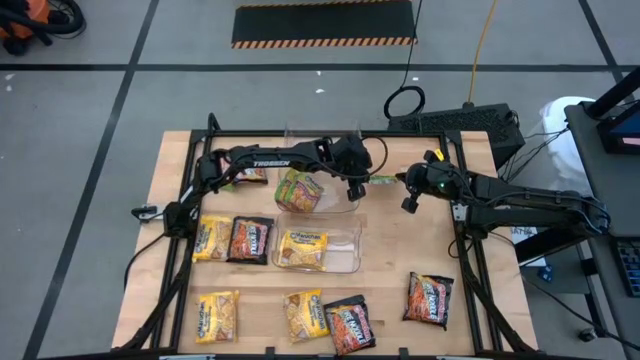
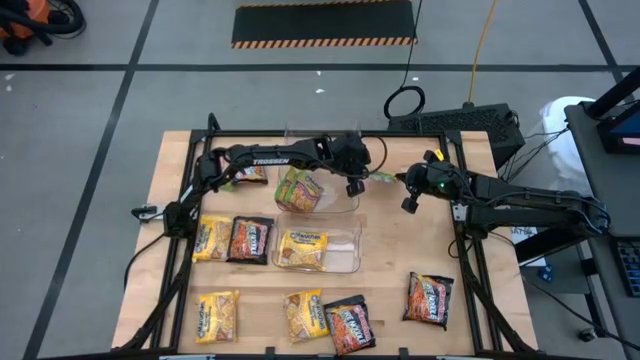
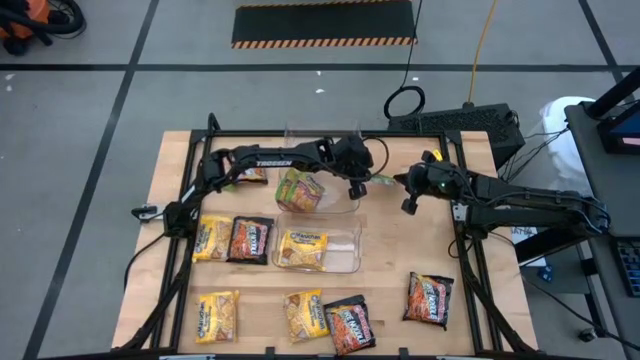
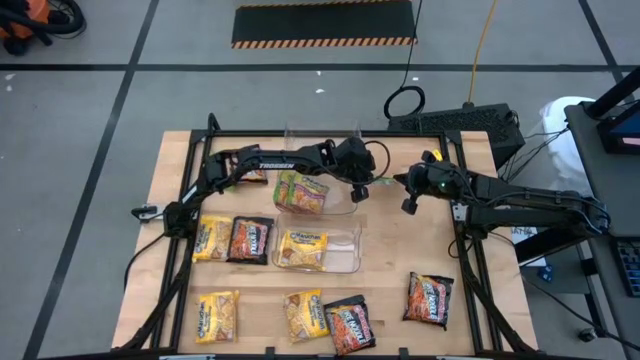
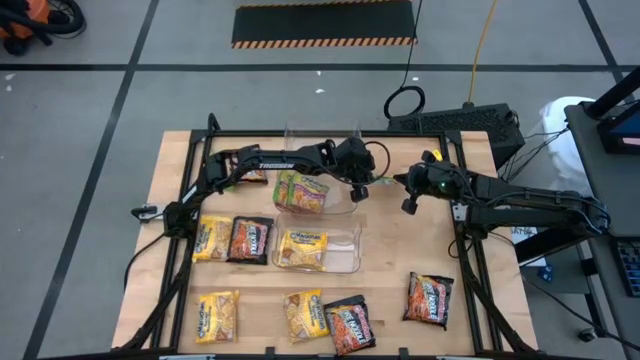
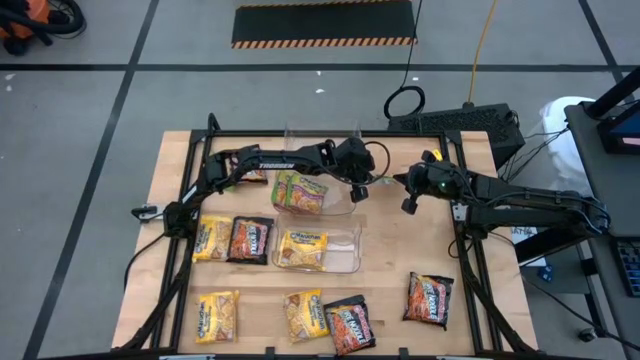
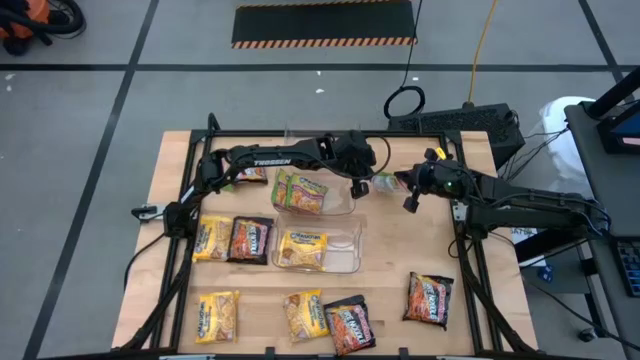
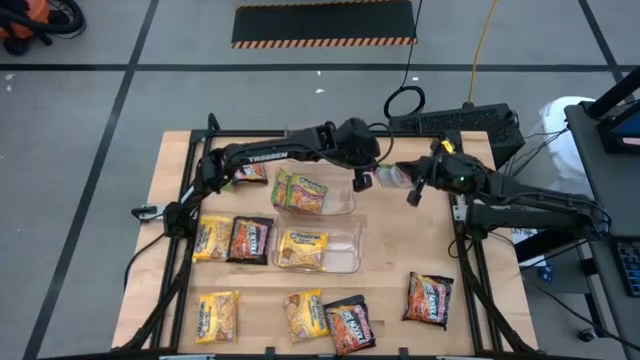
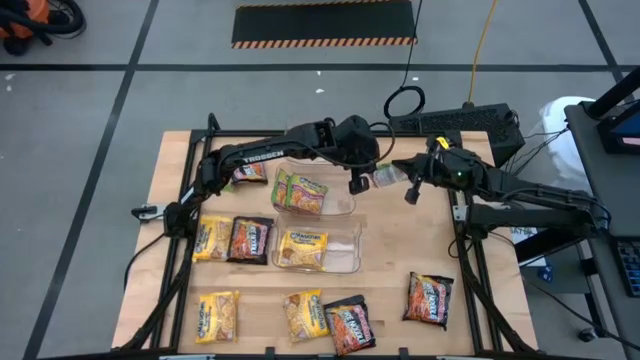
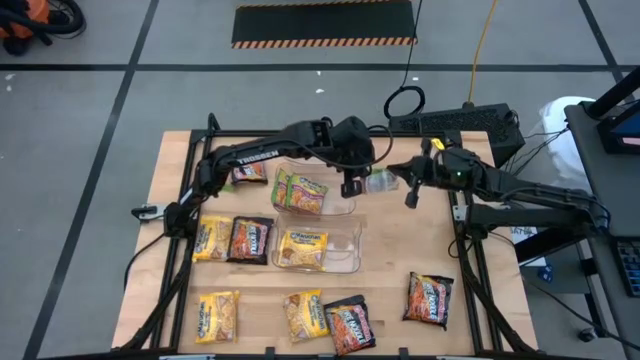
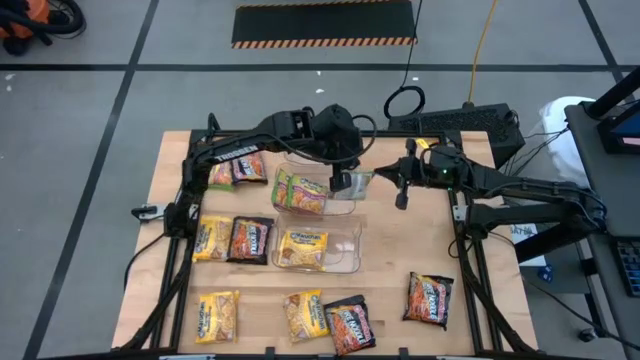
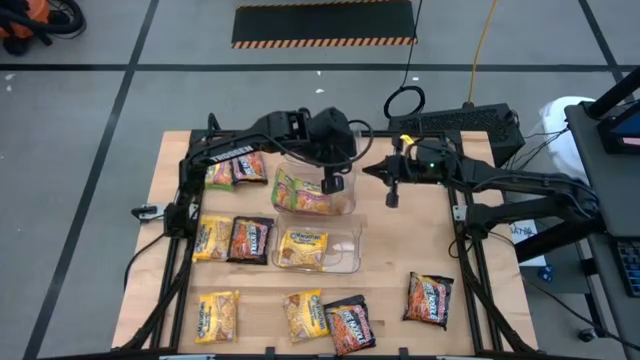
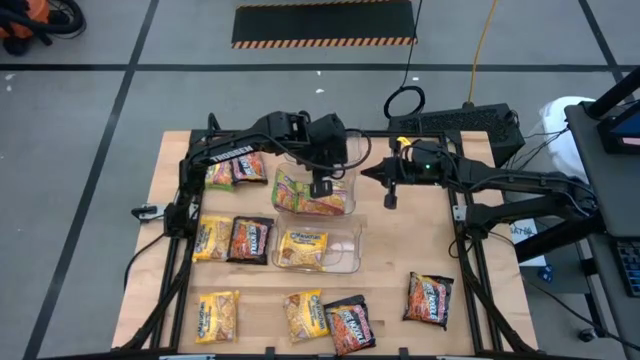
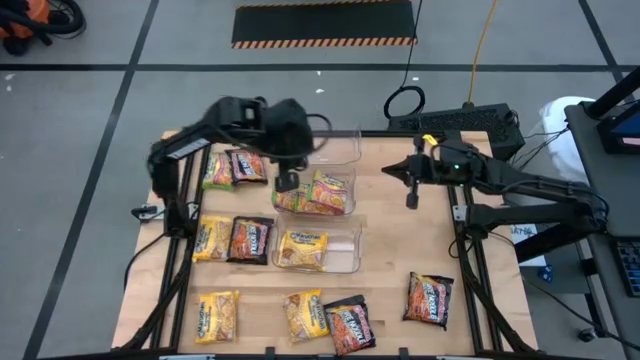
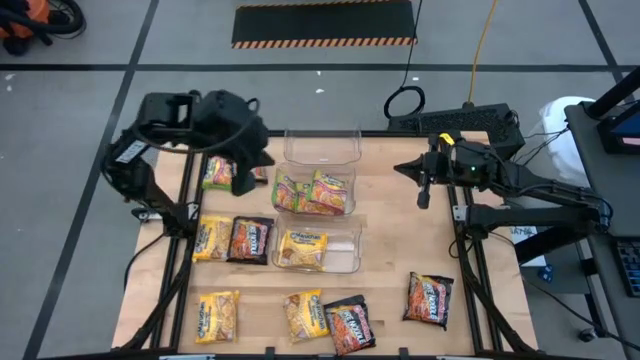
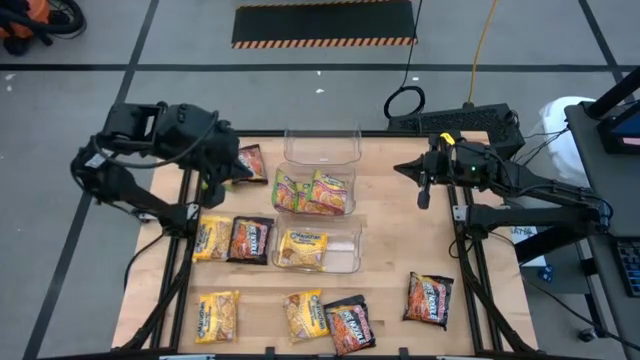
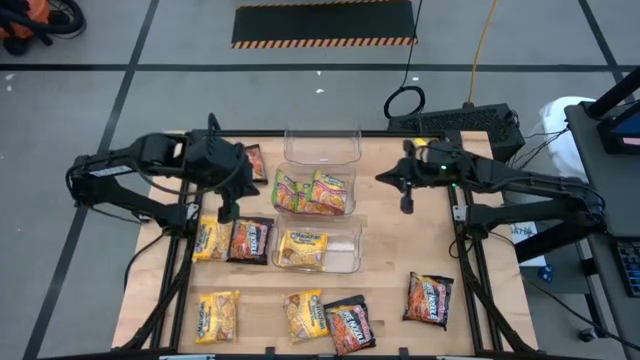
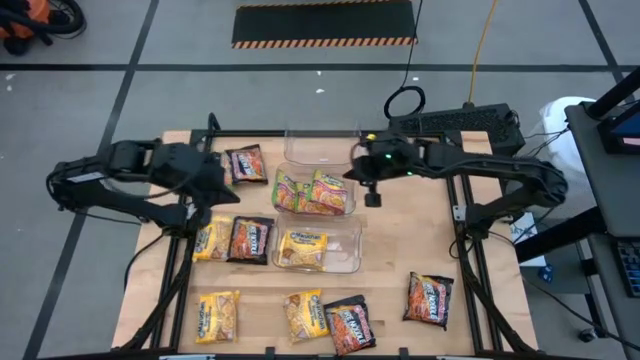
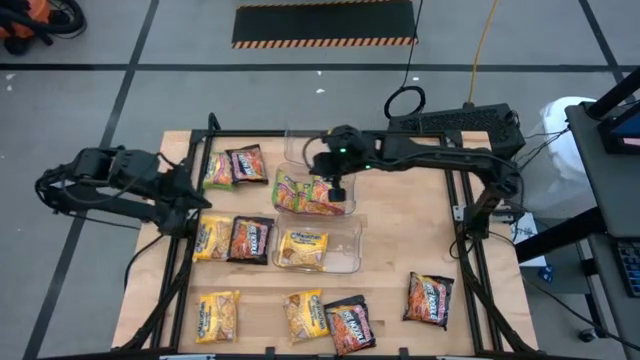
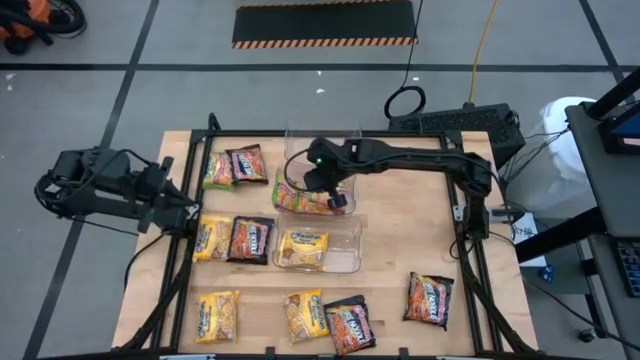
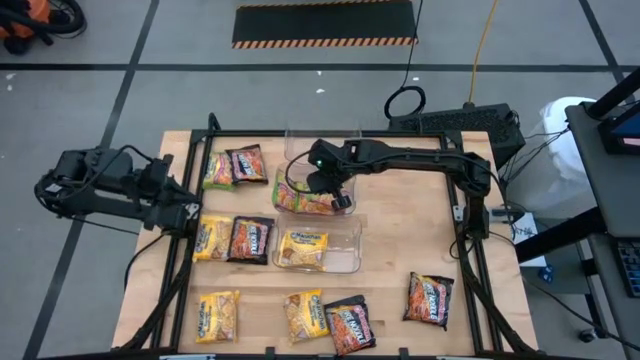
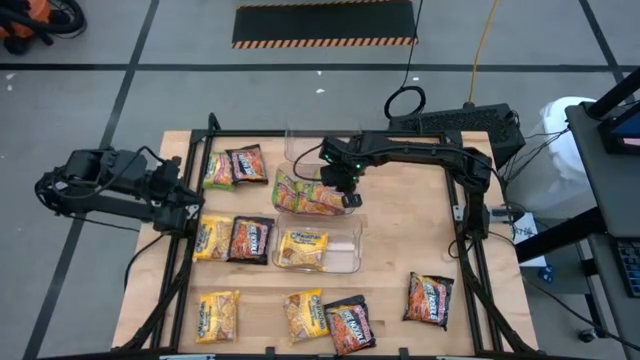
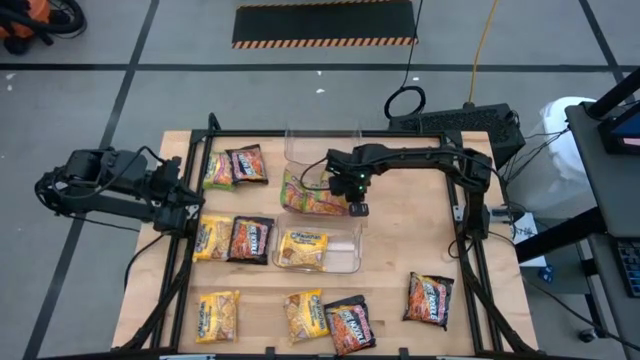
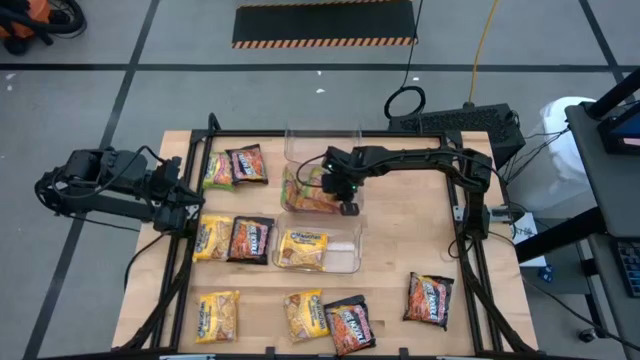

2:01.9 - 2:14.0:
Task: Sort Maruchan noodles
Put the green noodle pack into the center transparent bin

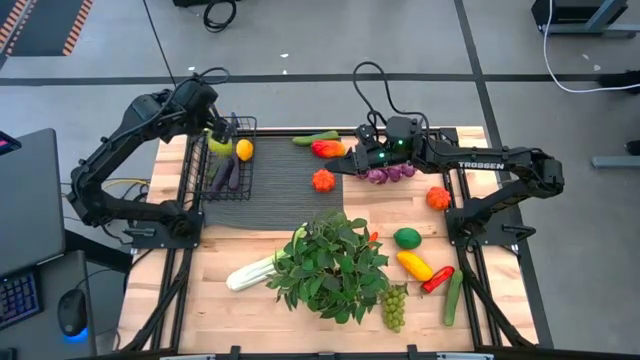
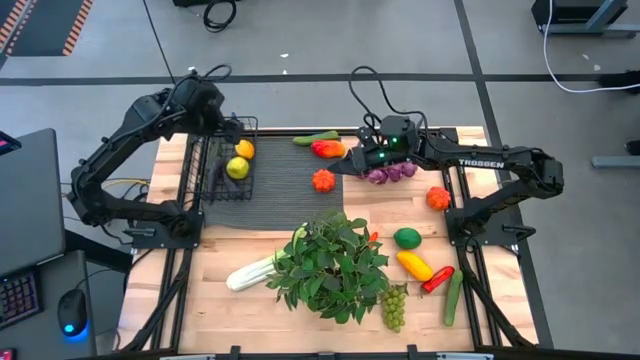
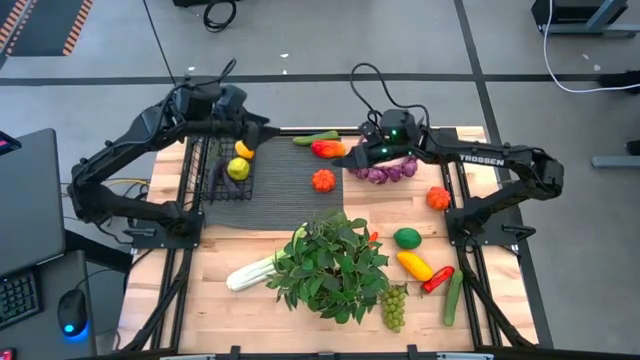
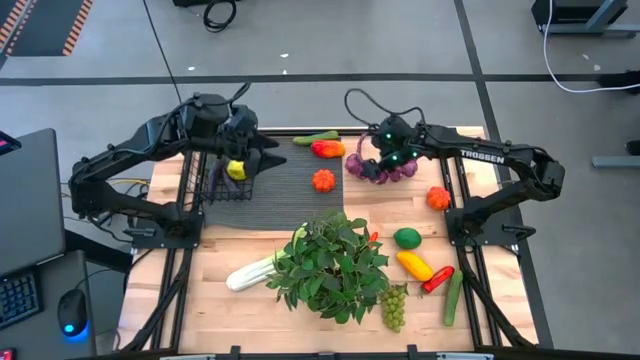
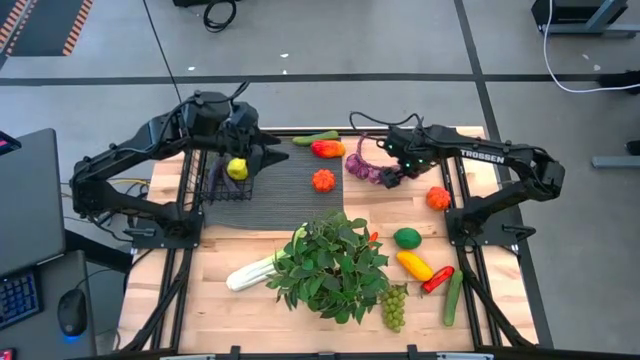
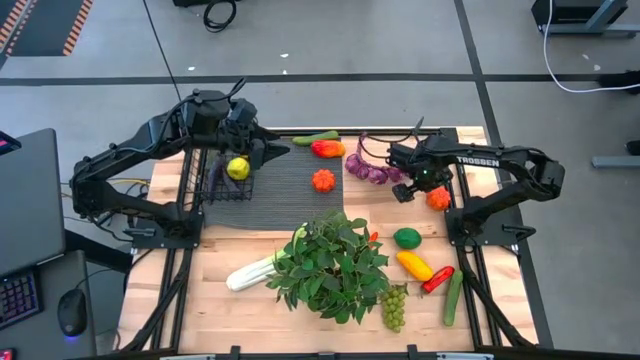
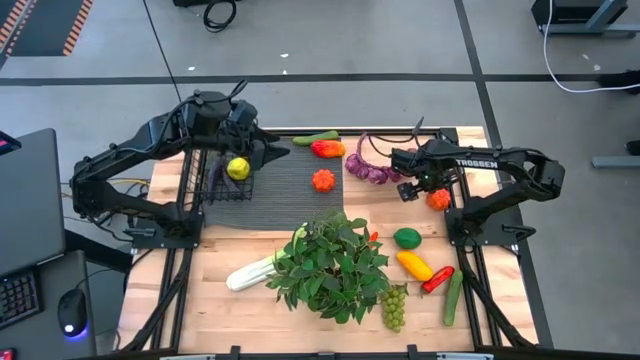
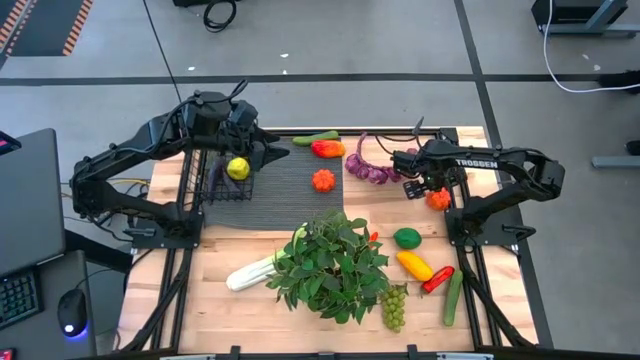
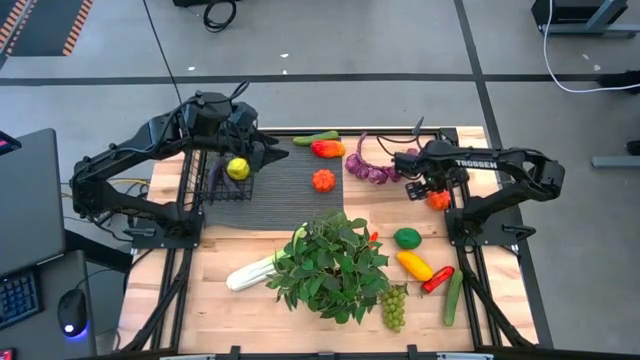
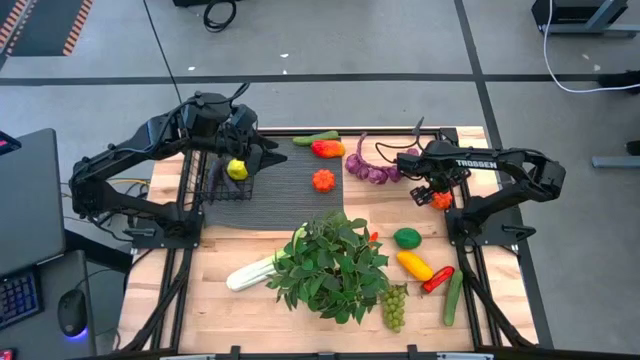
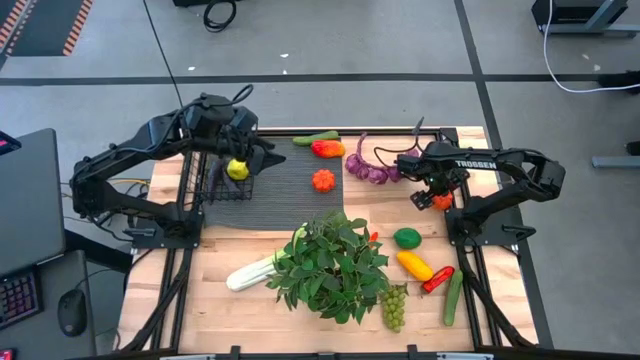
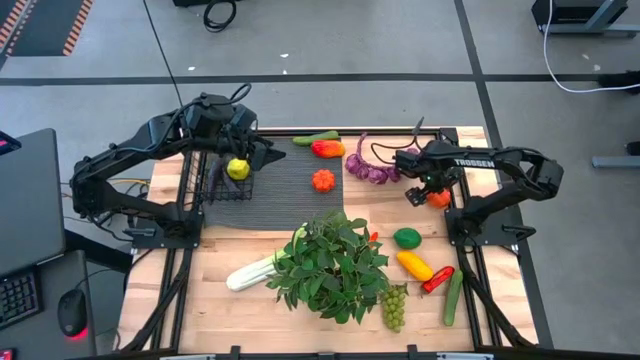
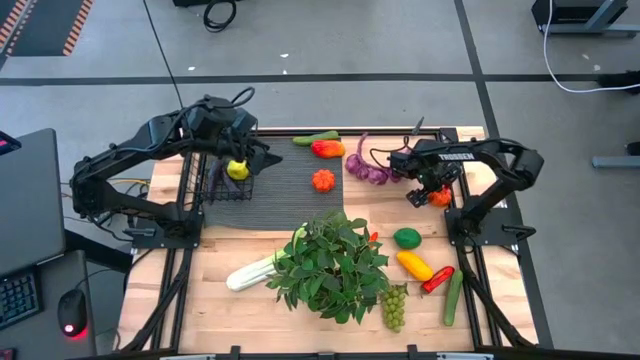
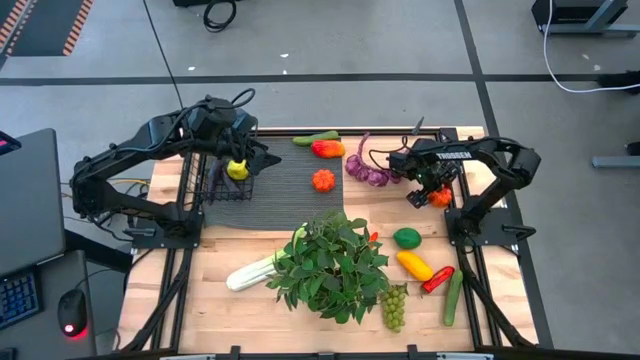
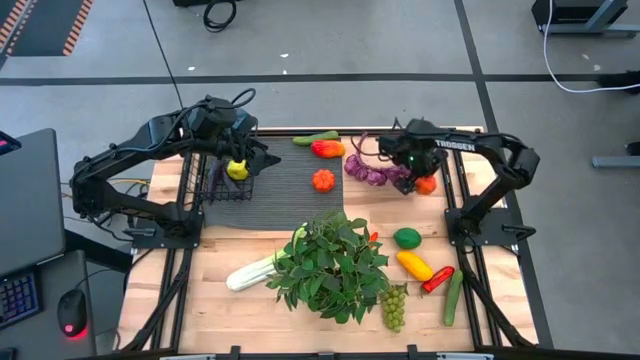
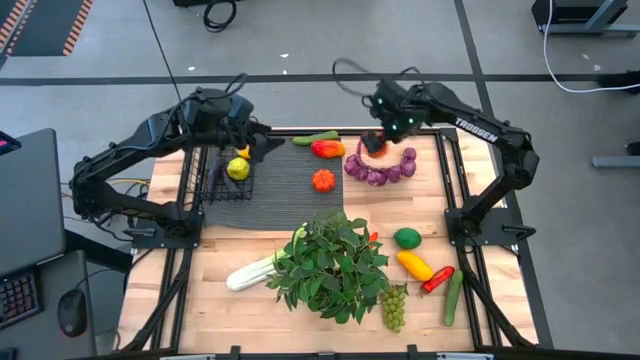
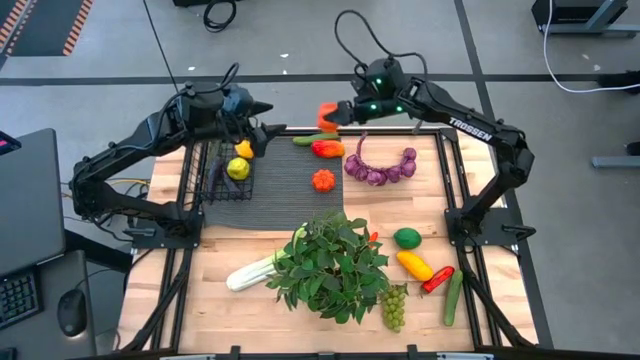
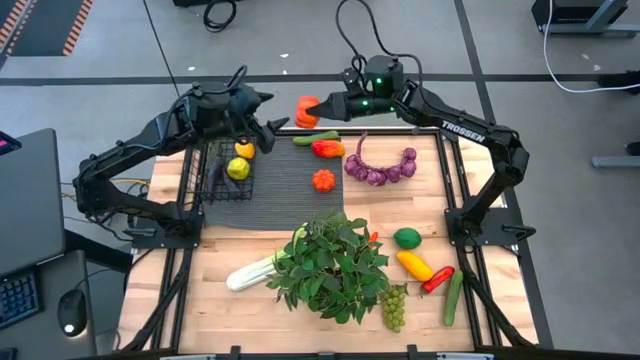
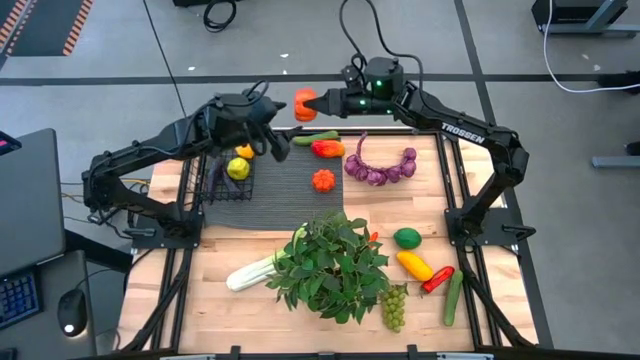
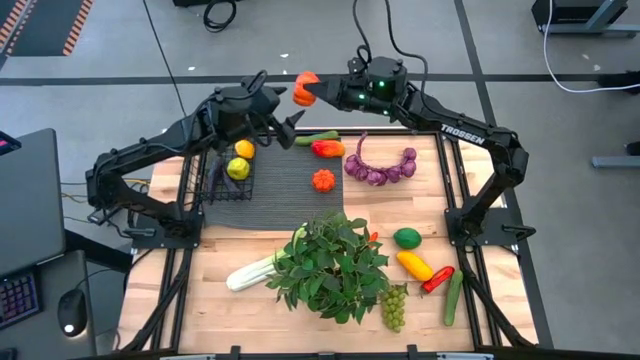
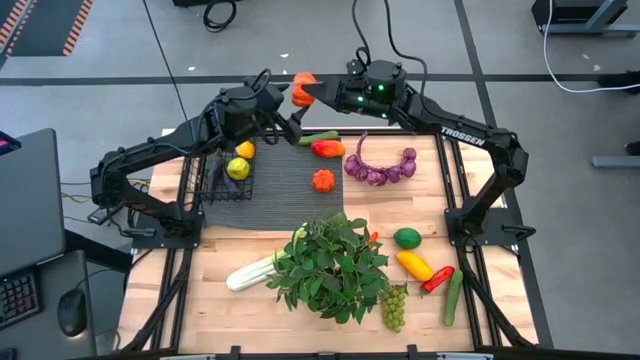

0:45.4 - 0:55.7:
Task: Build produce basket
Put the right orange pumpkin into the wire basket
